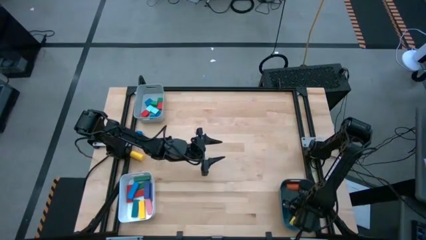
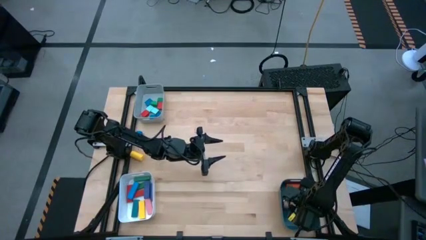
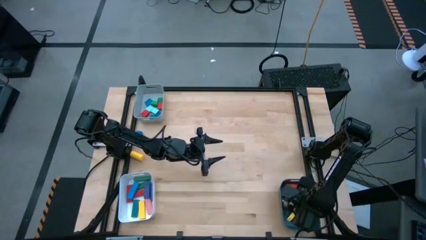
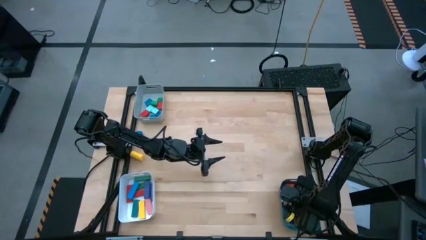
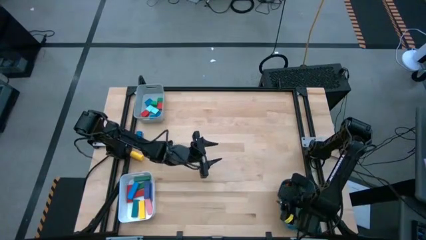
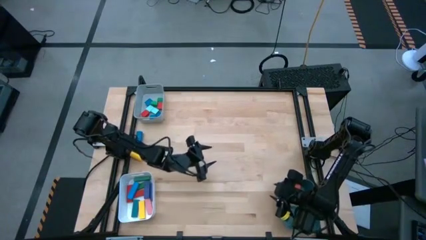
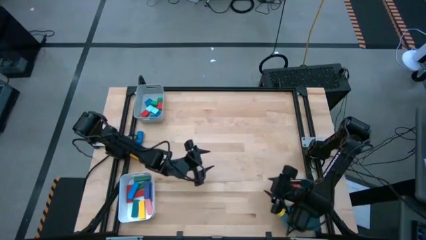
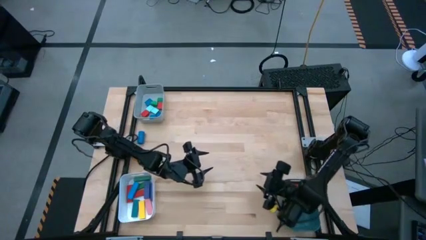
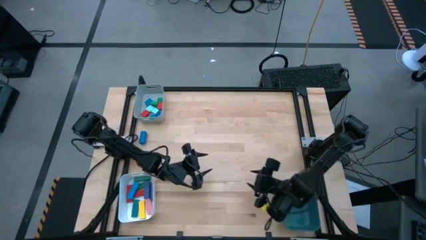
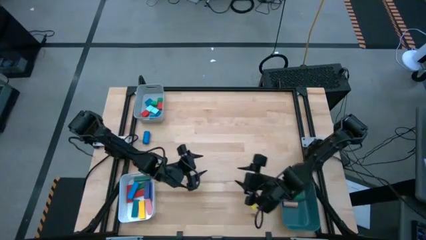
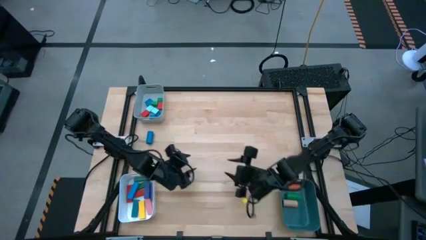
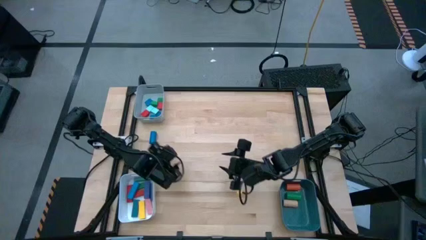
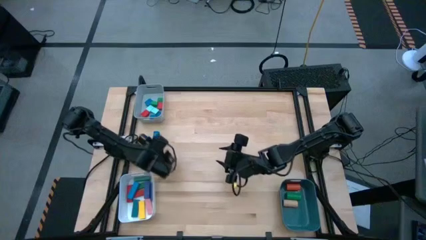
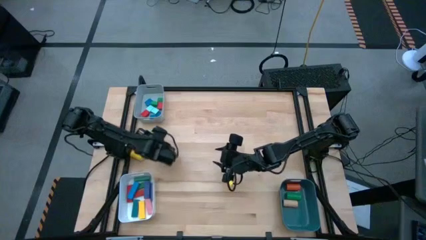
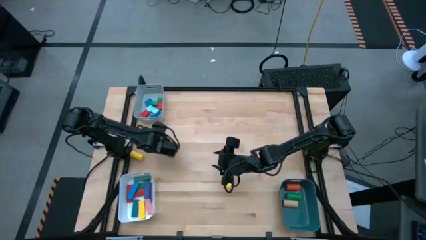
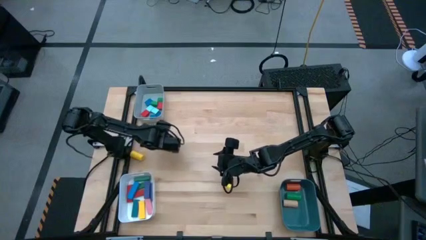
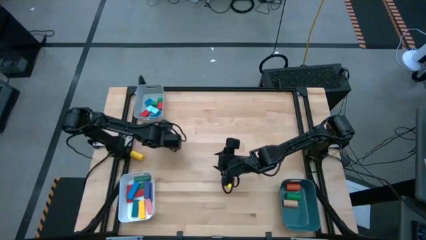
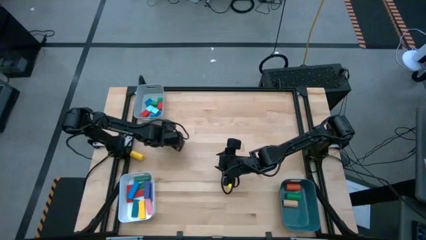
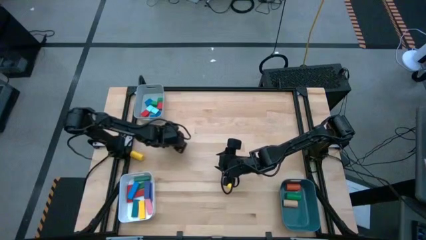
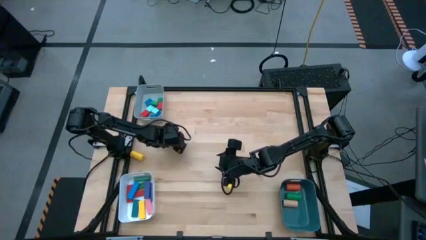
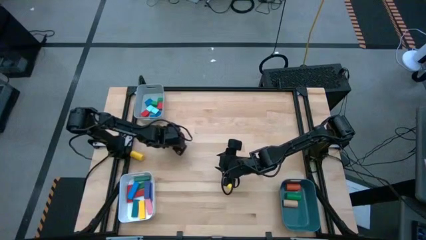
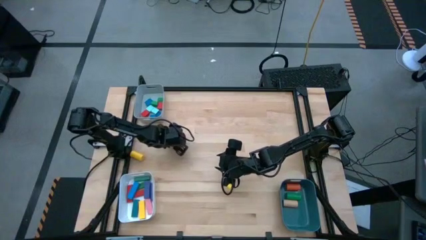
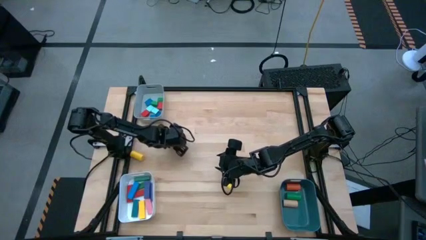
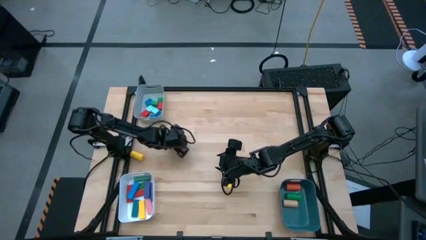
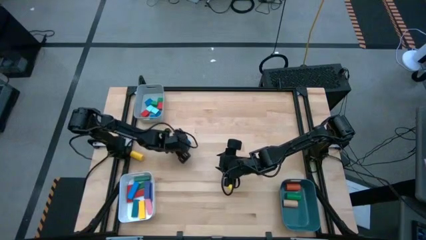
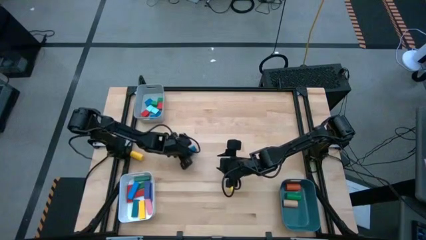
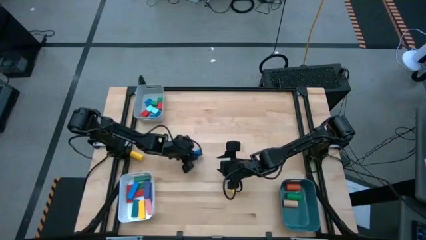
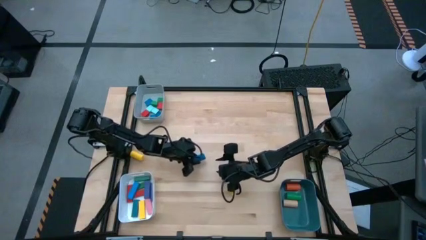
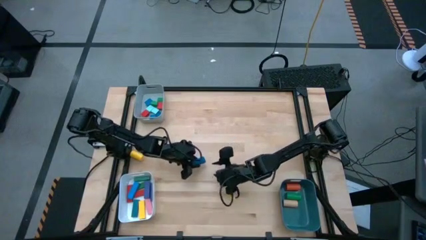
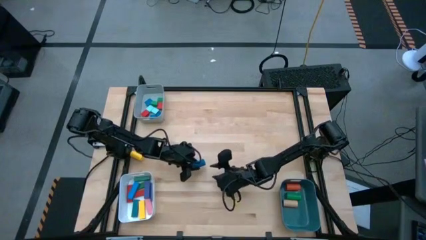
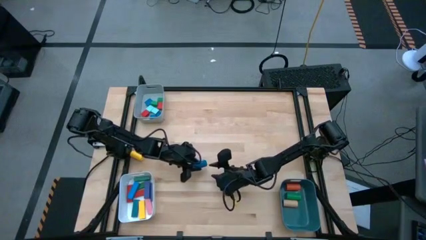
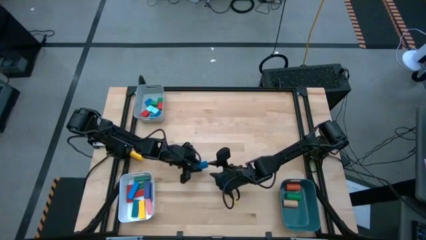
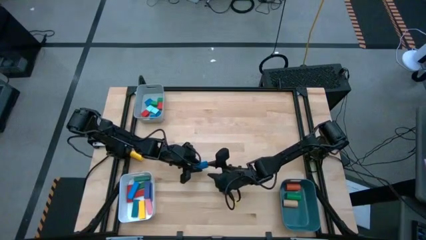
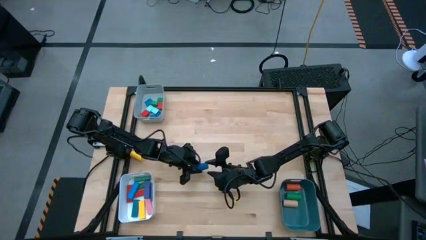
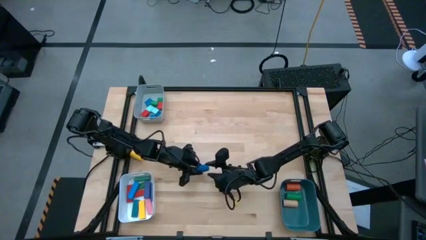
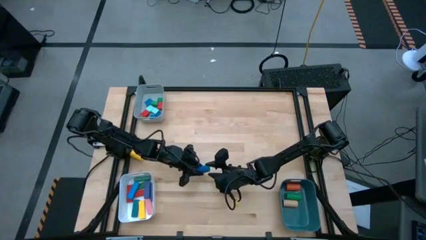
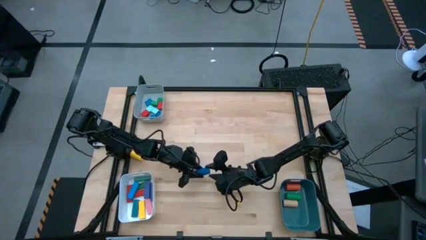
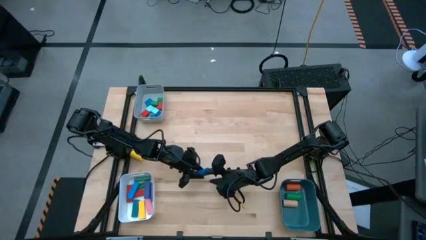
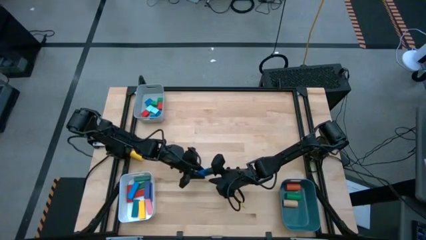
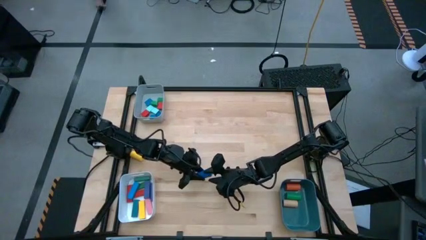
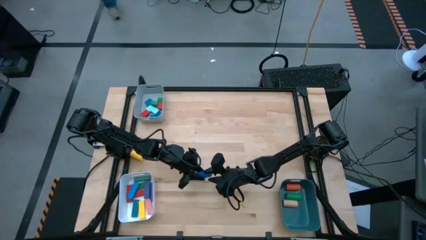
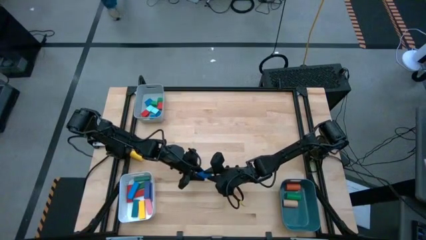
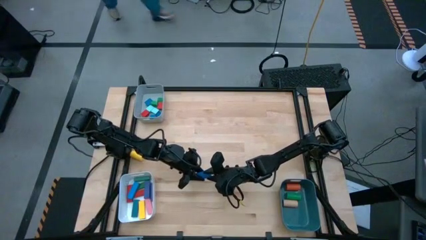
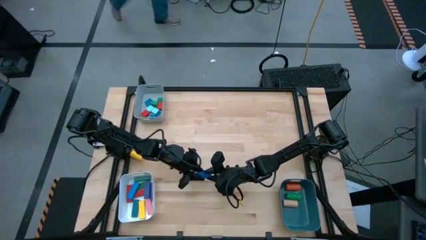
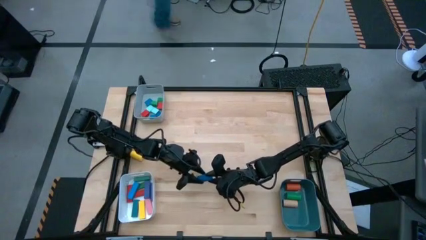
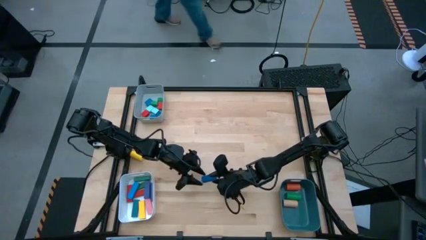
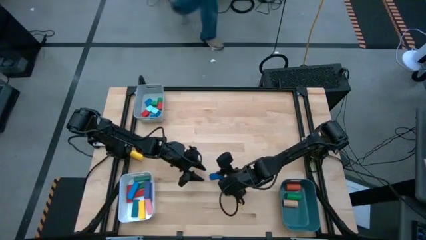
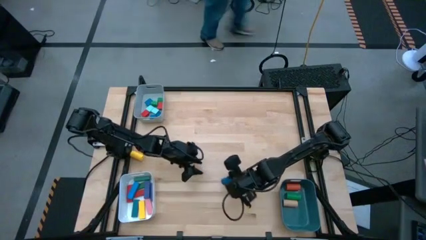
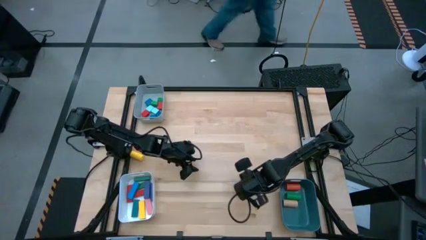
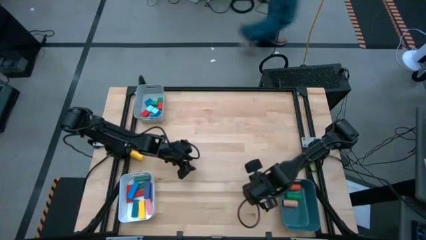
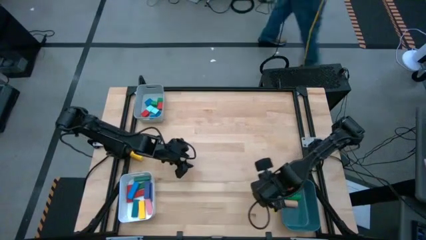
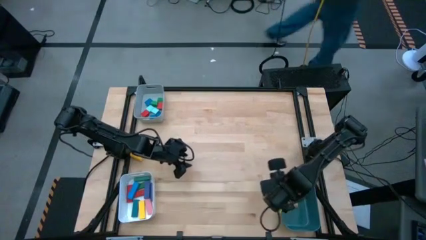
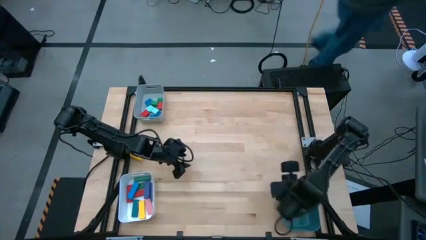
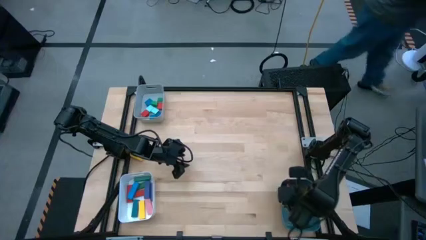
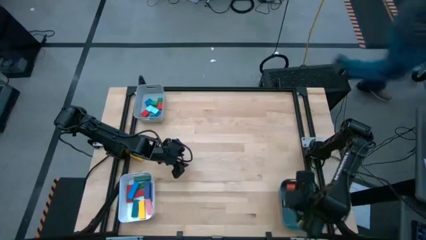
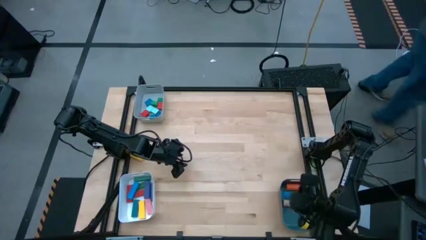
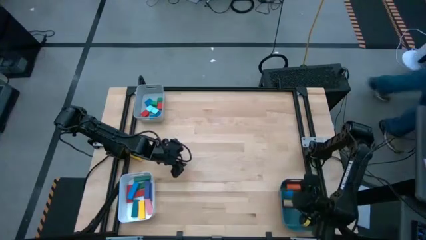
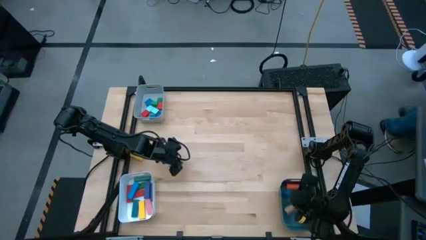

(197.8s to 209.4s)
Task: Sort blocks by size
Put the blue cylindrical block into the blue bin

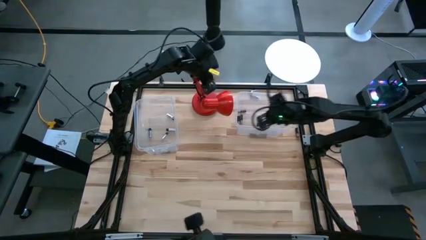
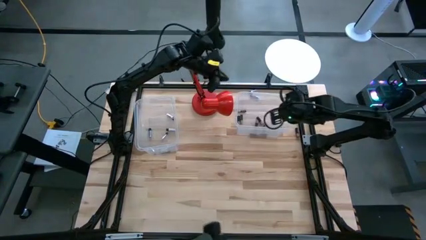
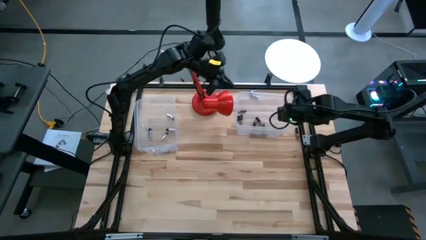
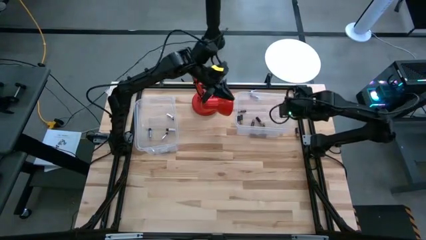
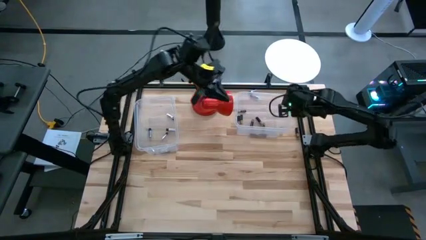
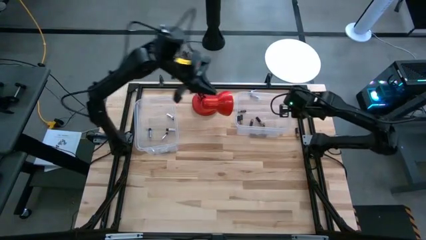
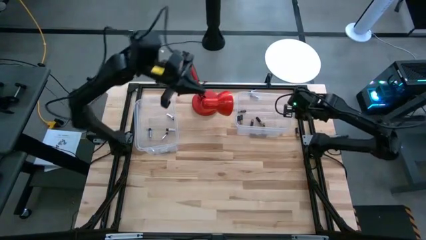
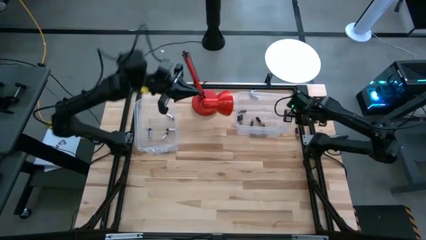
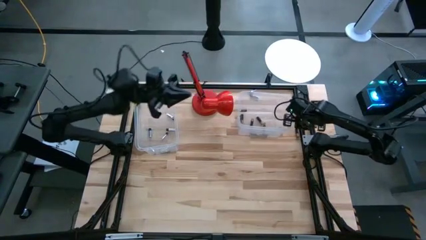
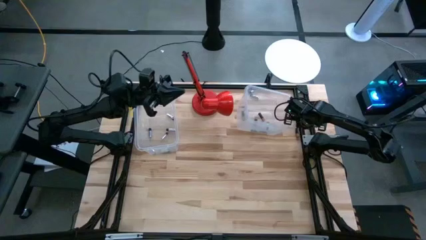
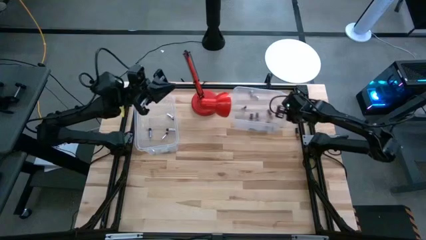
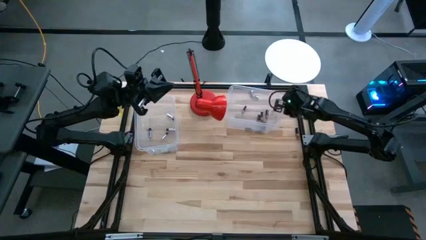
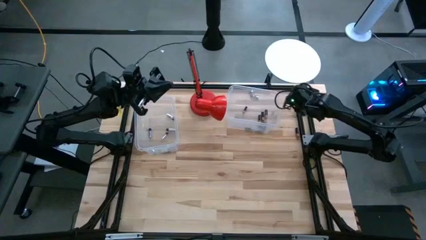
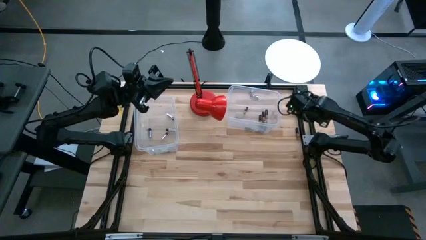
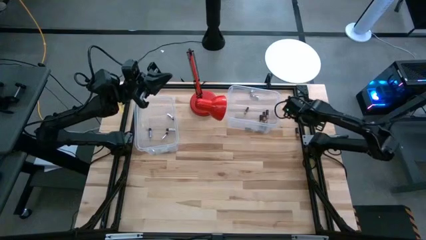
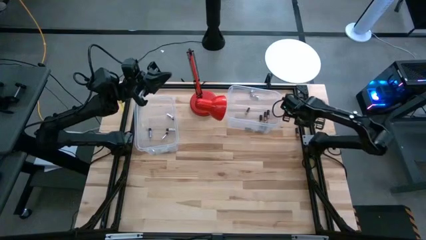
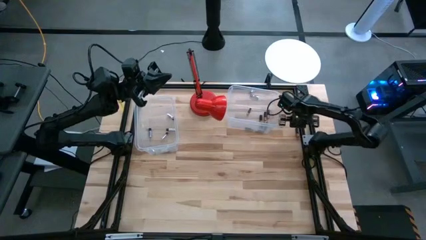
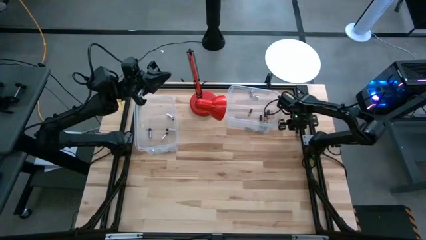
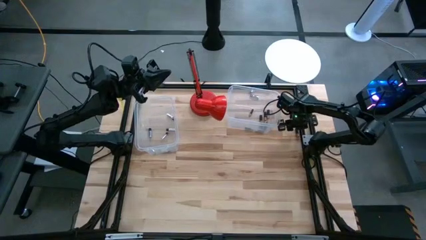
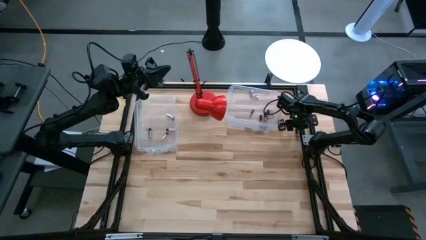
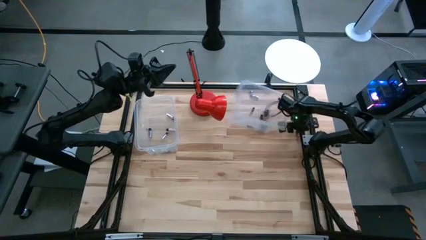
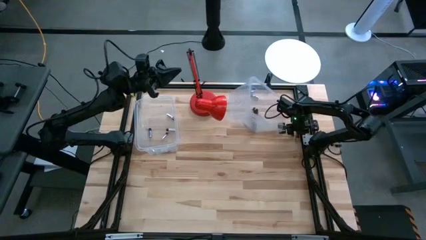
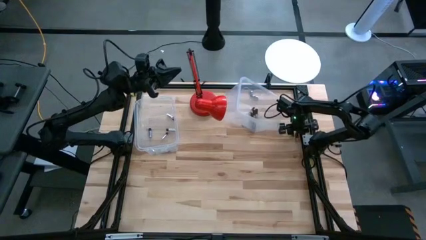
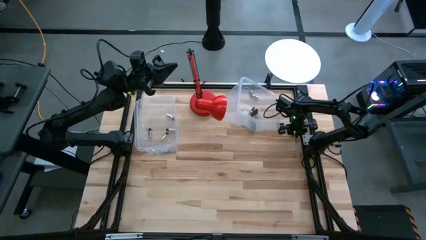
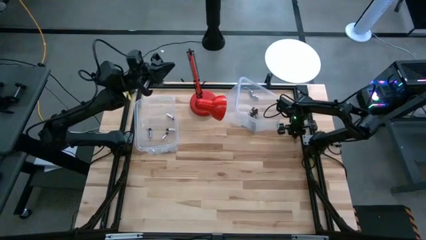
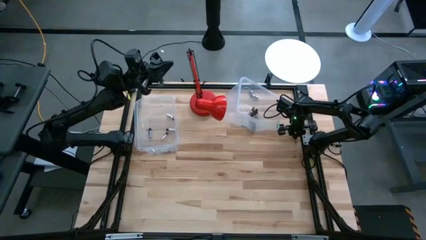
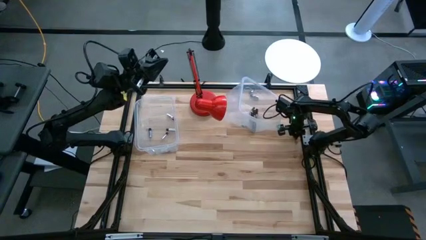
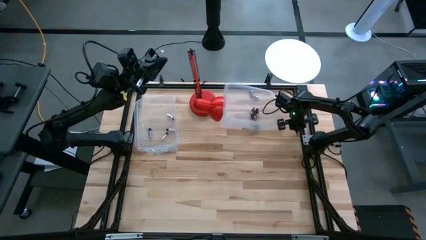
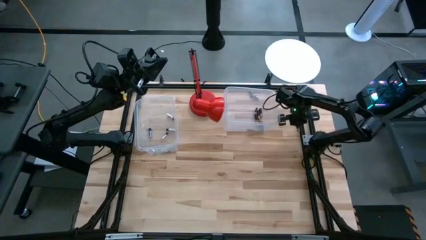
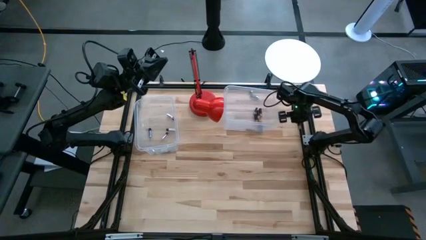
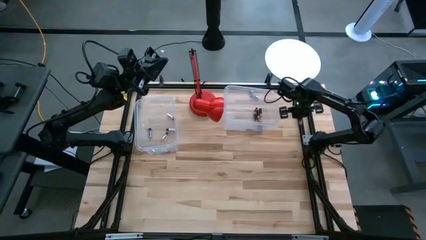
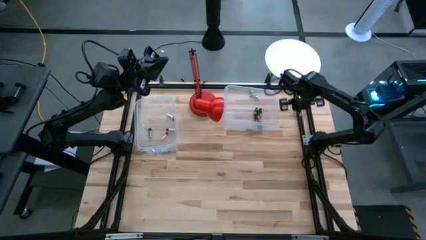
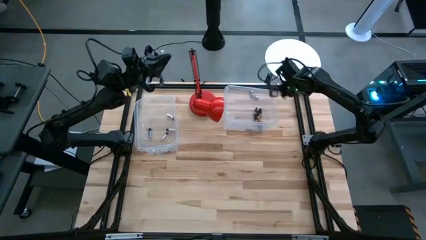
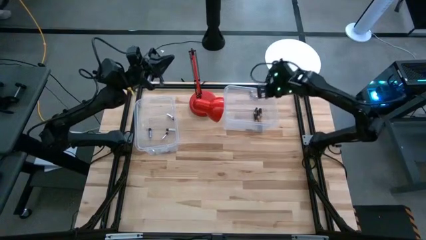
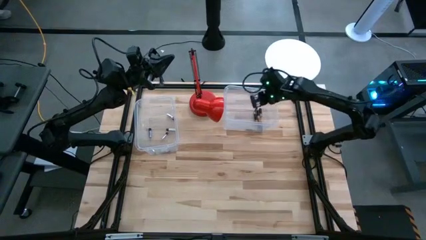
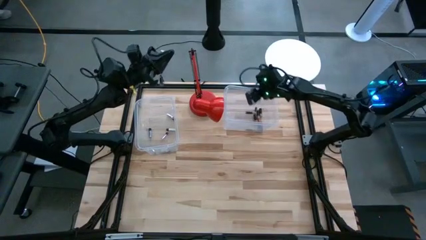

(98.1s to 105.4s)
Task: Sort batteries
Put the black battery into the right transparent bin
